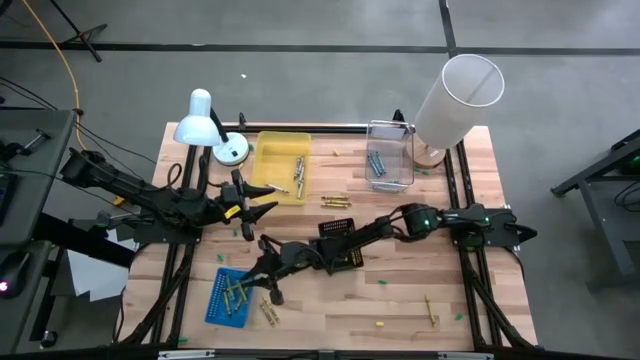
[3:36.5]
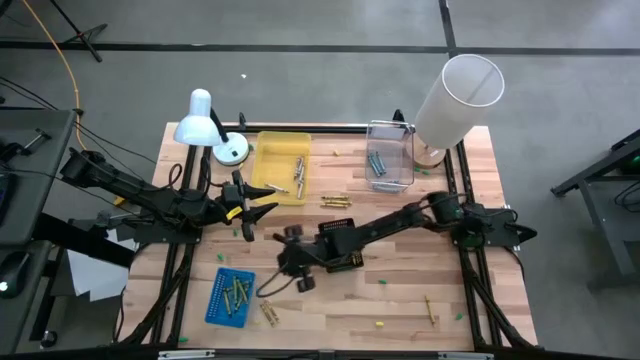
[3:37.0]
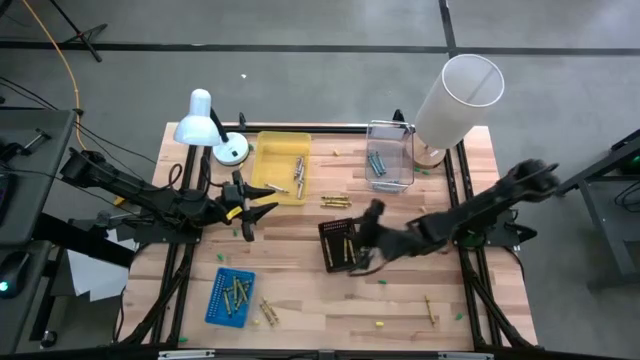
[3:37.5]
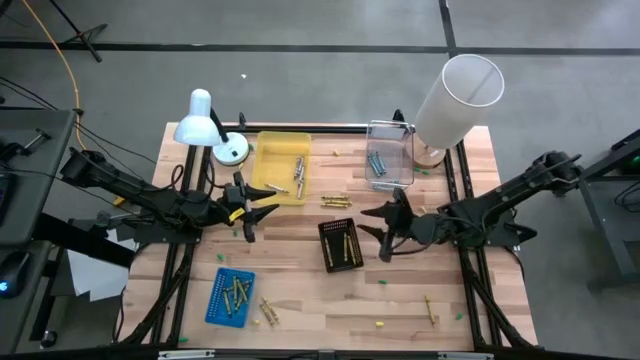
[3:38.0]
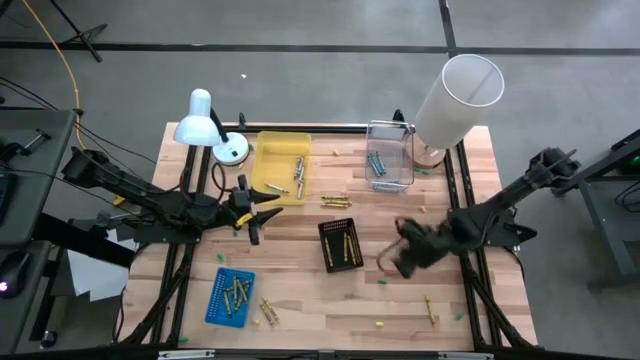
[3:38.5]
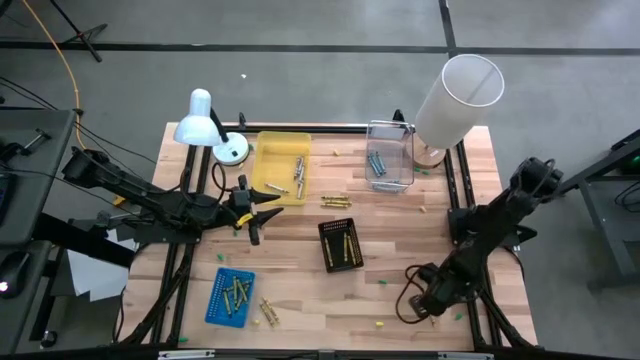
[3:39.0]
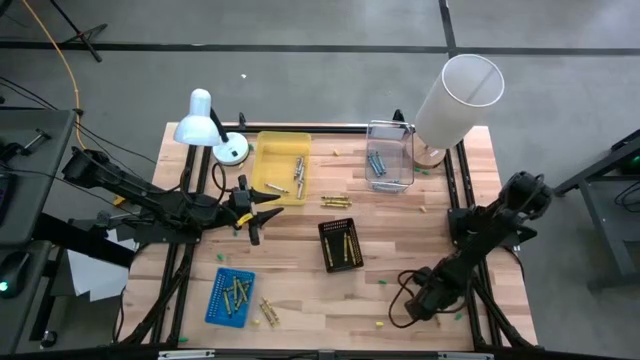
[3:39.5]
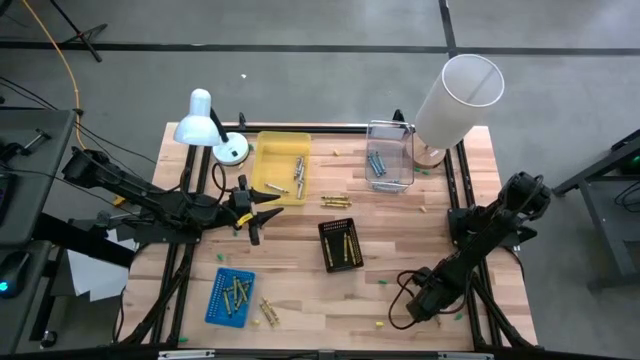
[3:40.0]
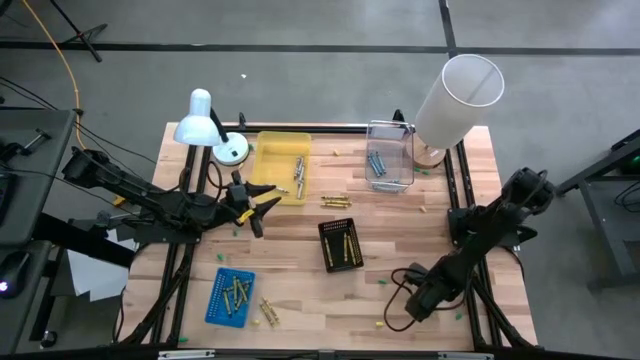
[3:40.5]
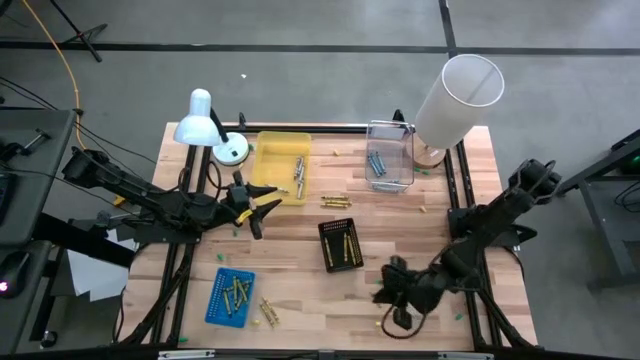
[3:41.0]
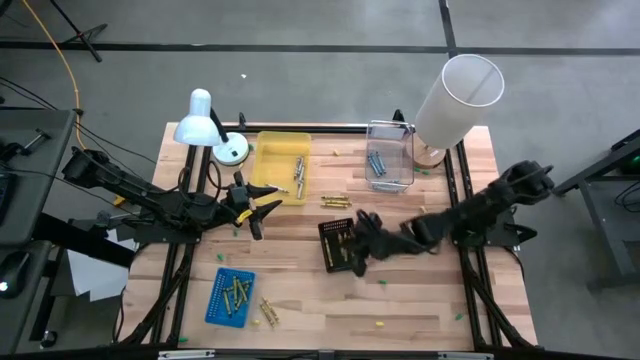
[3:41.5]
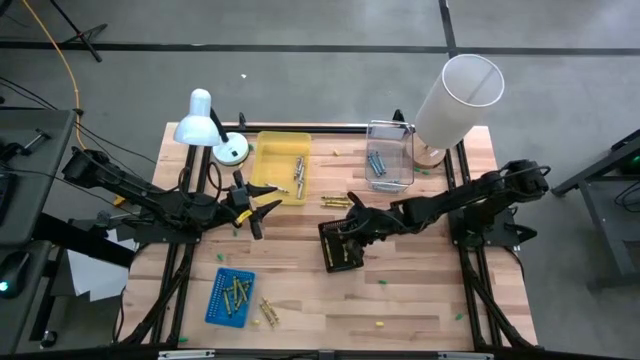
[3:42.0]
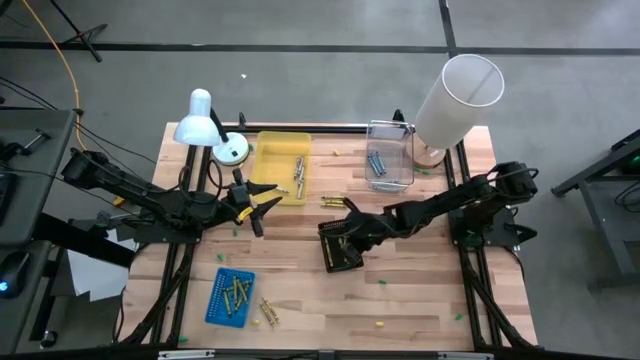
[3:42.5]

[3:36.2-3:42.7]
Task: Sort crayons
Put the yellow crayon into the black bin

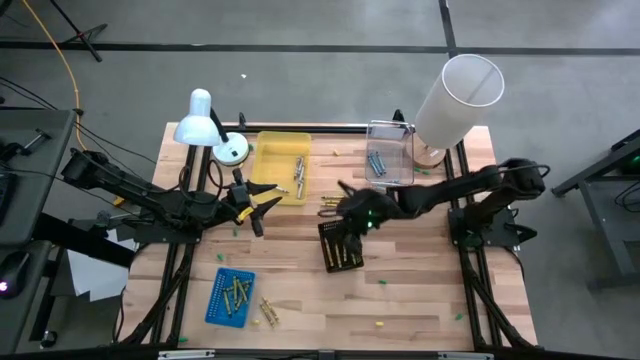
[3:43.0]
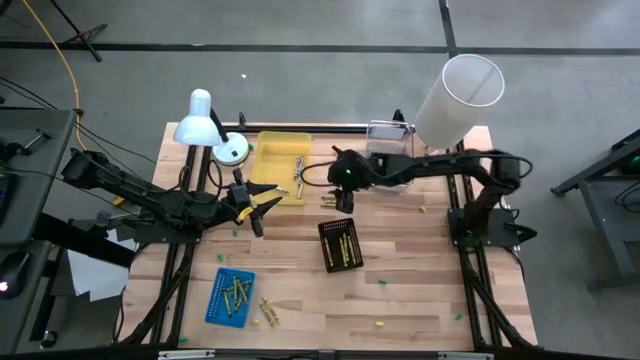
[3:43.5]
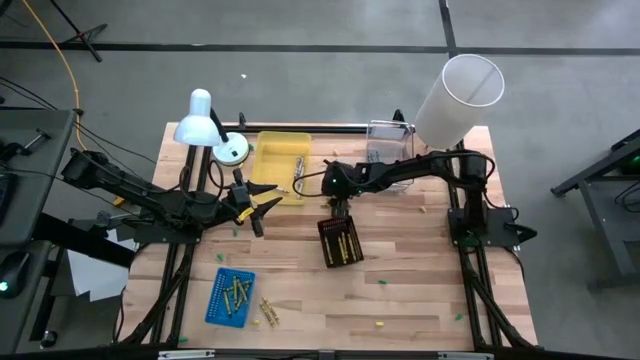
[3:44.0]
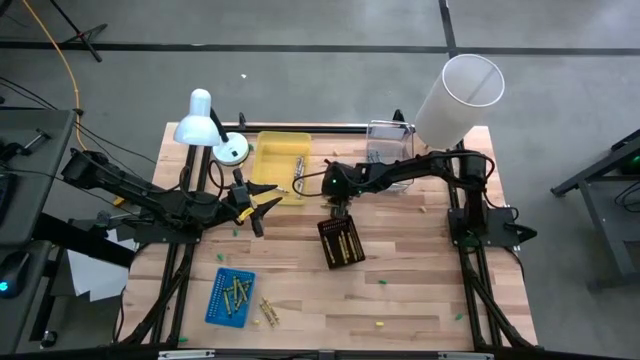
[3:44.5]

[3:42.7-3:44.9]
Put the green crayon into the blue bin

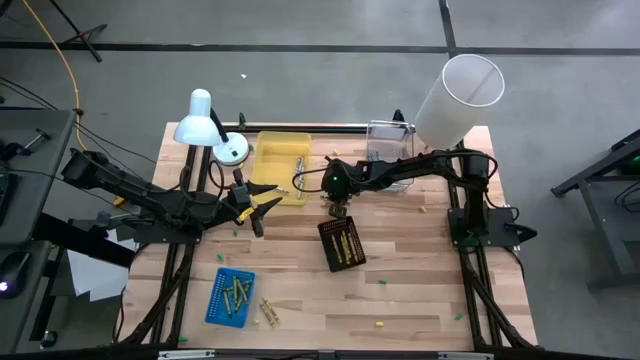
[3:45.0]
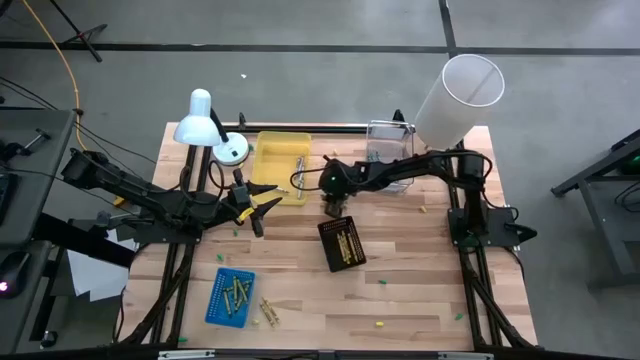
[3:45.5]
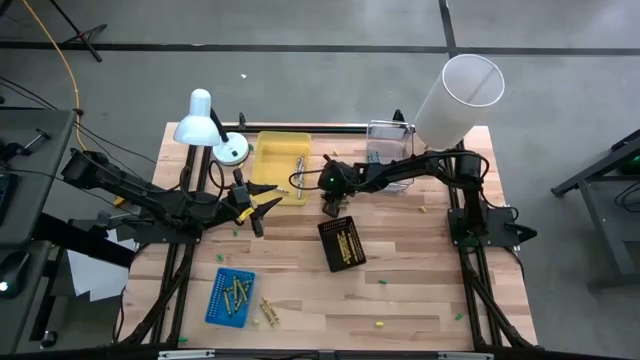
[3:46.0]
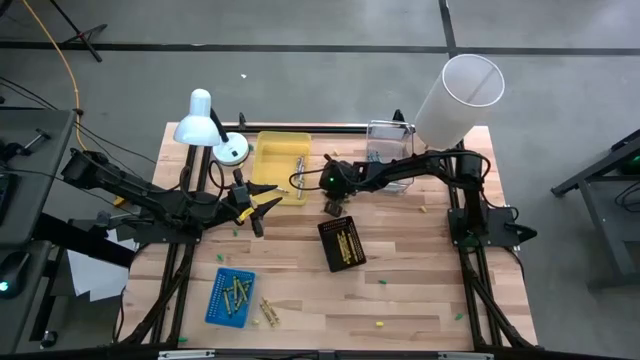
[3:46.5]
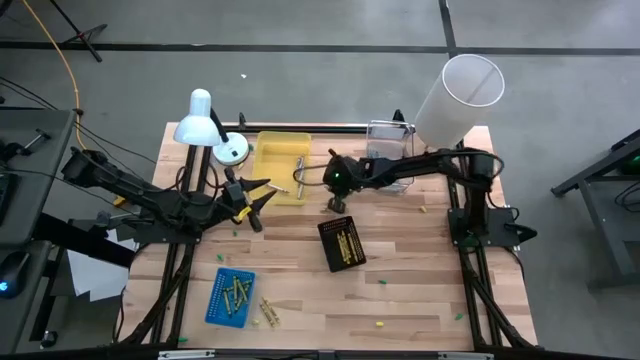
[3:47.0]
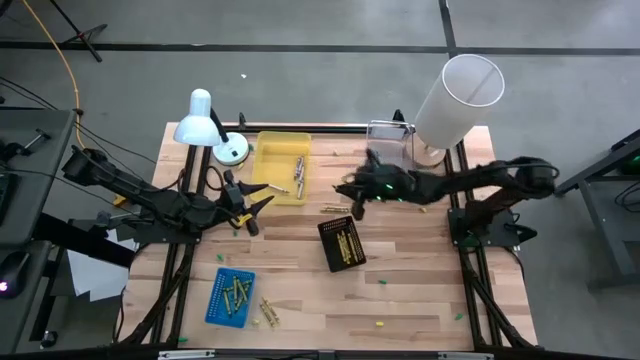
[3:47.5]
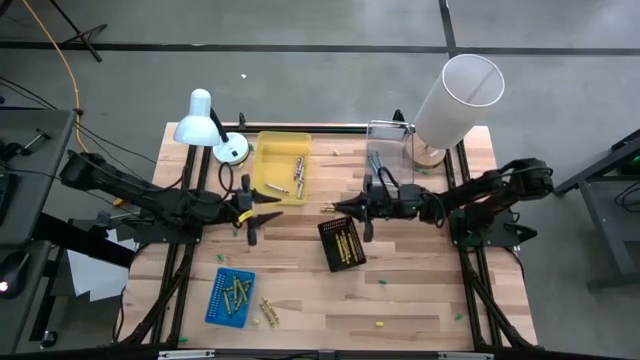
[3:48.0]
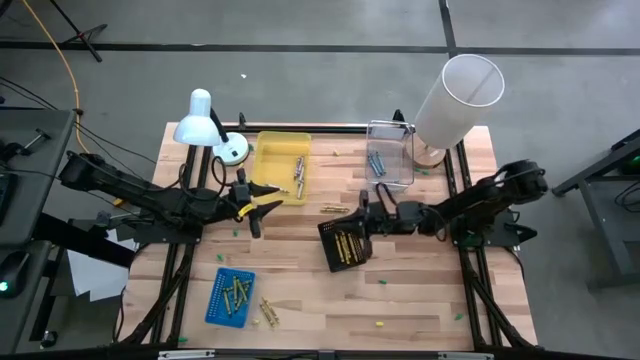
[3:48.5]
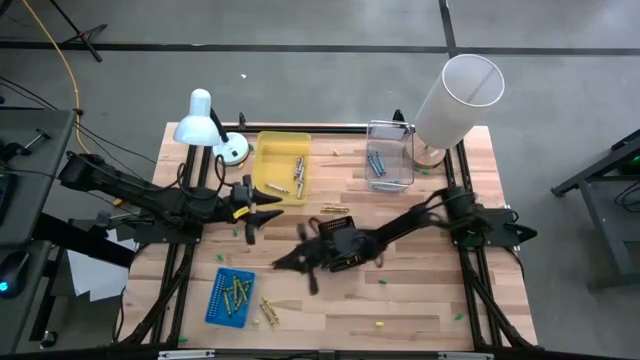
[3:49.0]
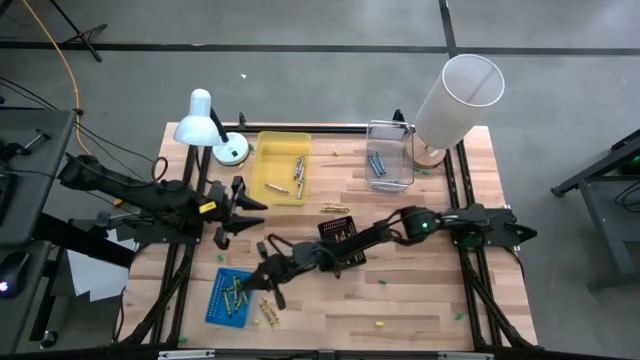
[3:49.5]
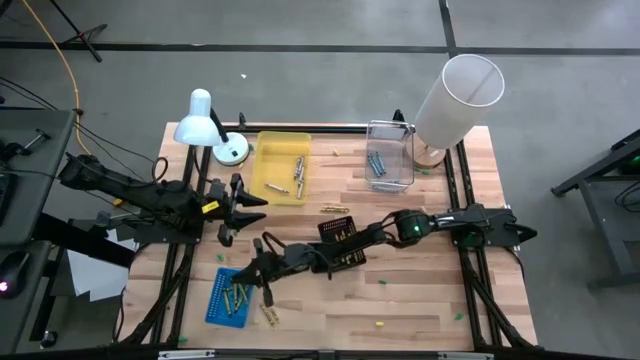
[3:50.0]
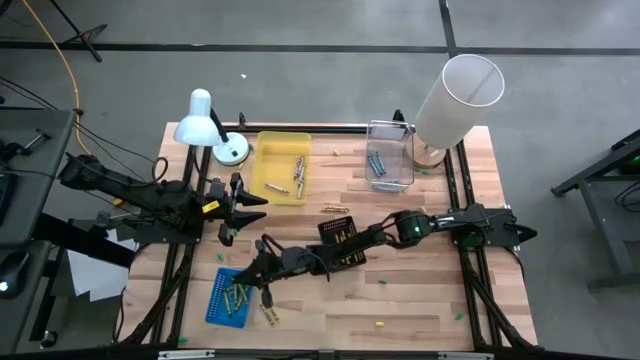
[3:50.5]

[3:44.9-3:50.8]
Put the green crayon into the blue bin

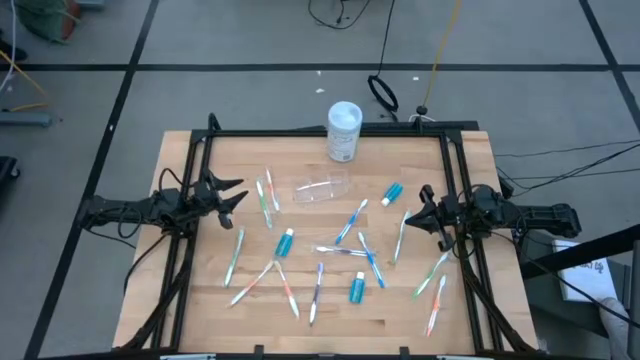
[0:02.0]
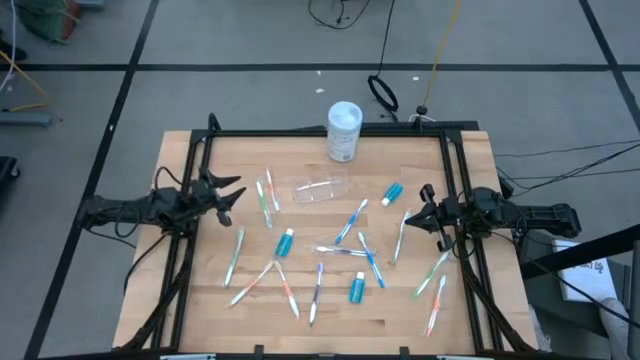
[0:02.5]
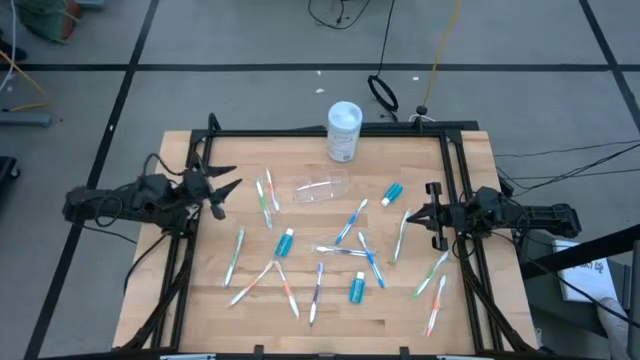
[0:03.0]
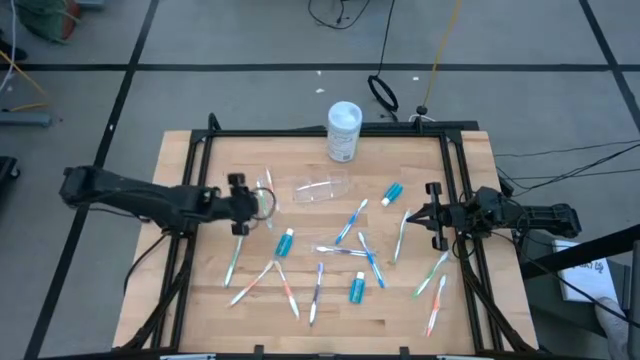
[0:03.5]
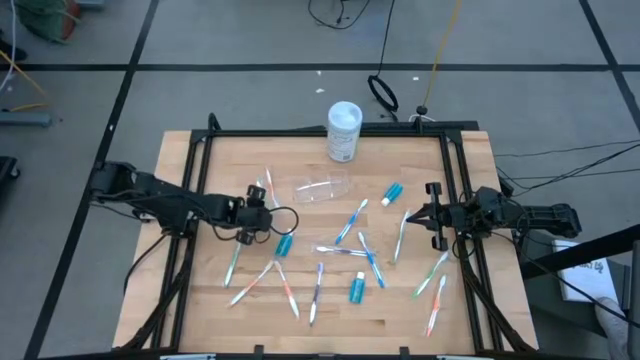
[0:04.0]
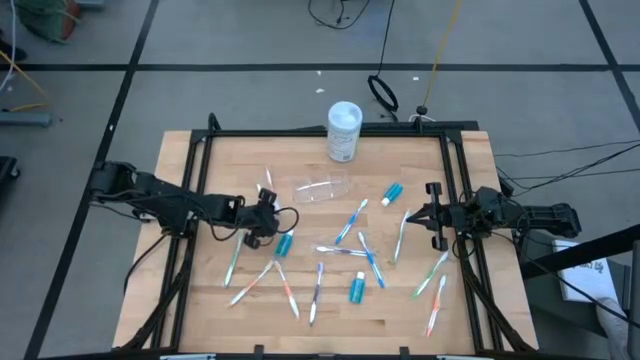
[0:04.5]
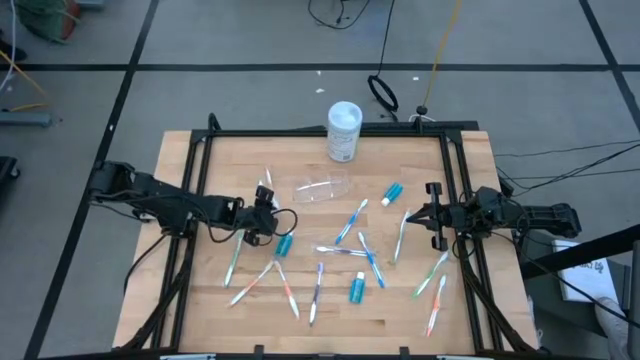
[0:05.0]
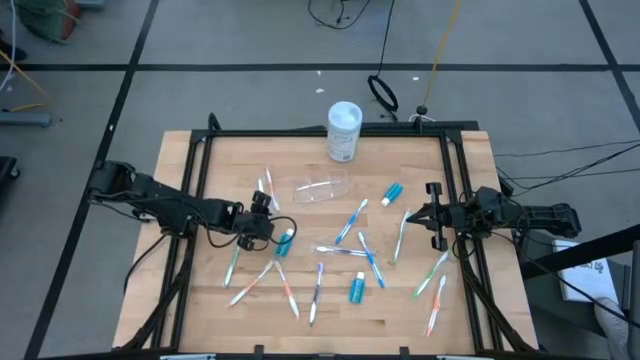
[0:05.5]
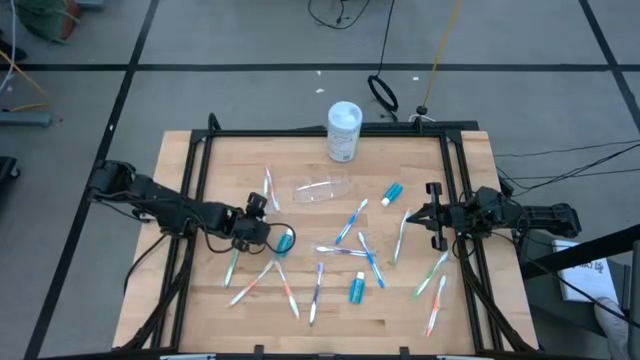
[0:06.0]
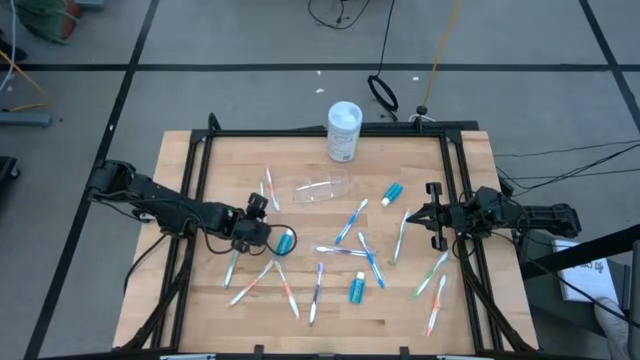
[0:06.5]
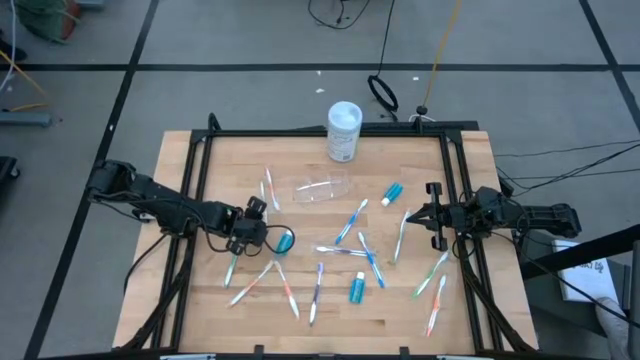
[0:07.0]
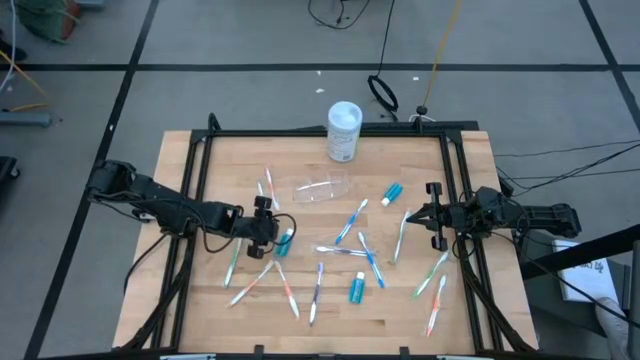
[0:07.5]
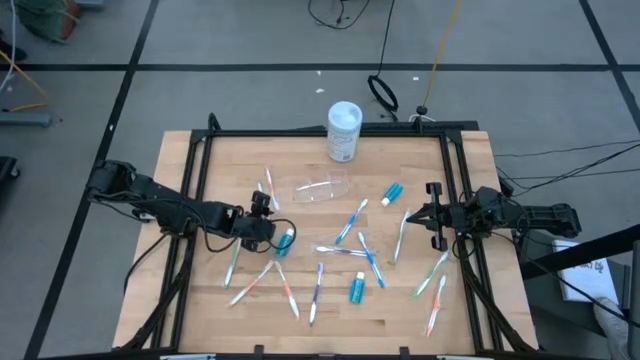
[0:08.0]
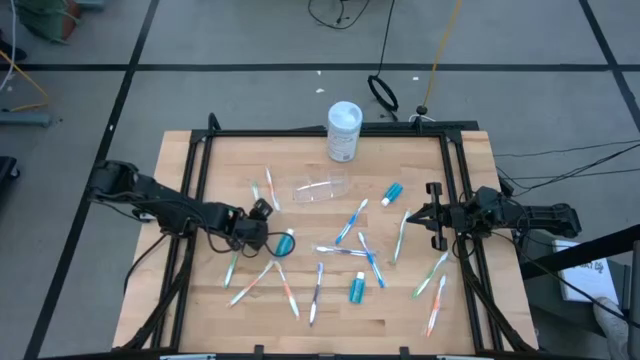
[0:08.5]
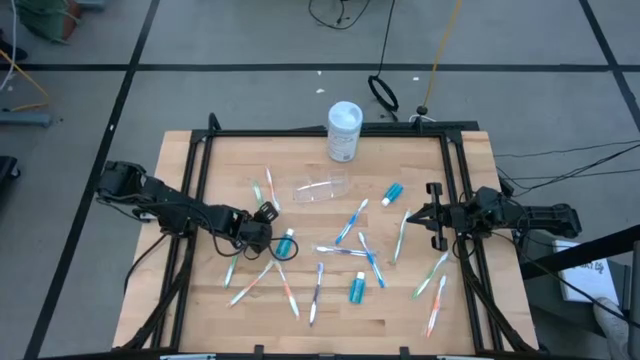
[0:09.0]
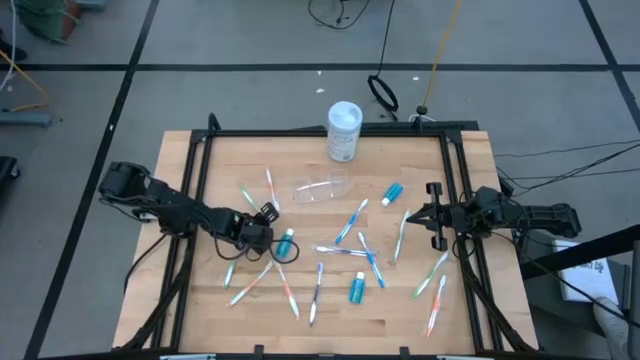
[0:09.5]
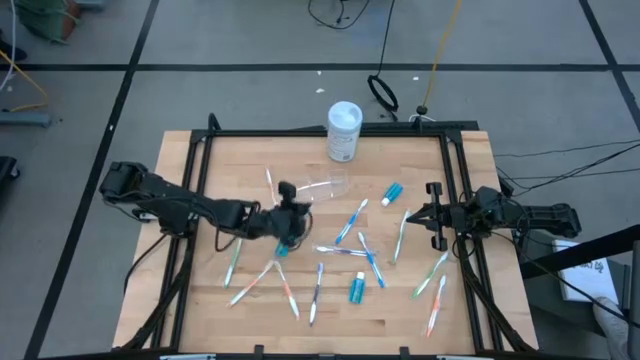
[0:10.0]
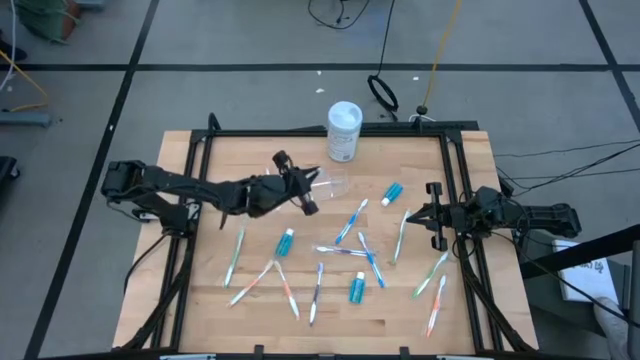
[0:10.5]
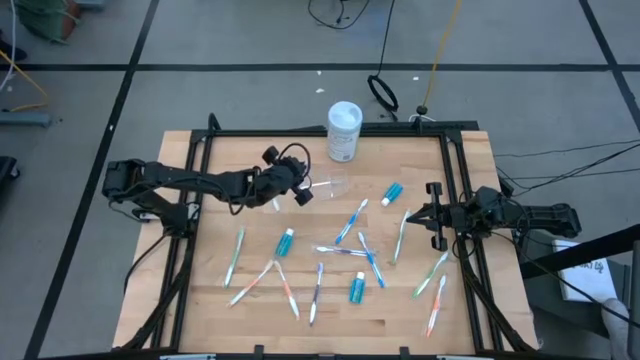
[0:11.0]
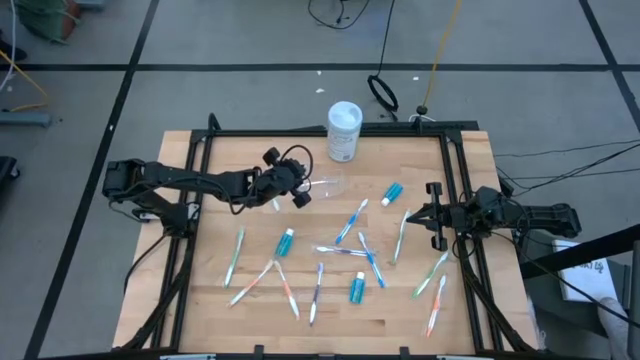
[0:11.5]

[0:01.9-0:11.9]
Task: Pick & Place toothbrushing station
Put the green toothbrush into the transparent organizer
